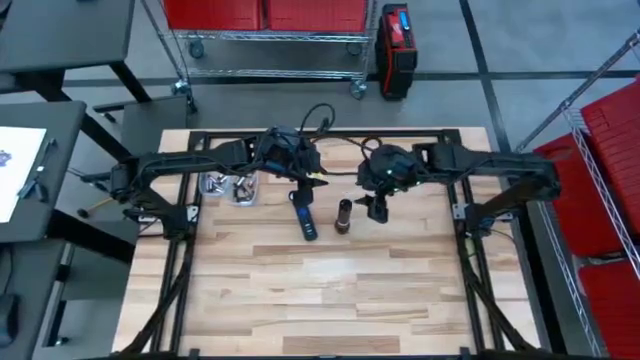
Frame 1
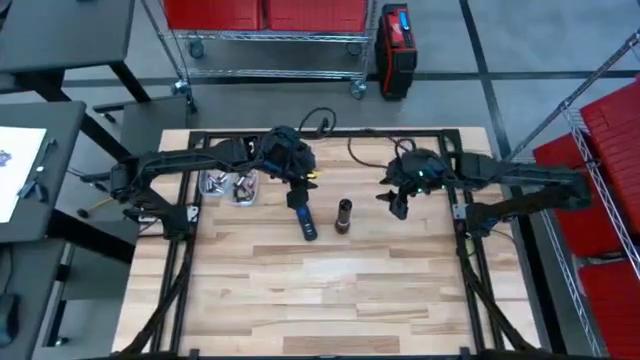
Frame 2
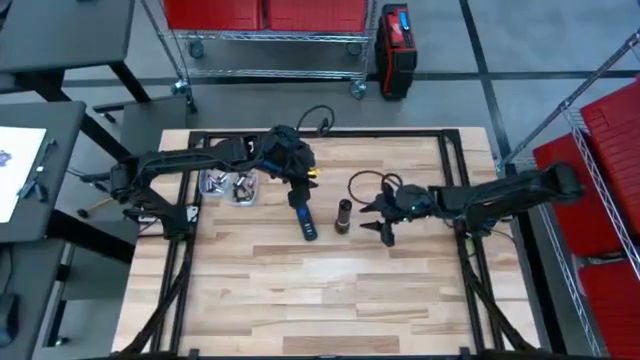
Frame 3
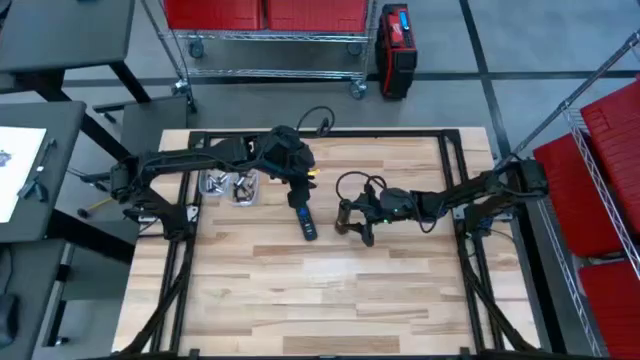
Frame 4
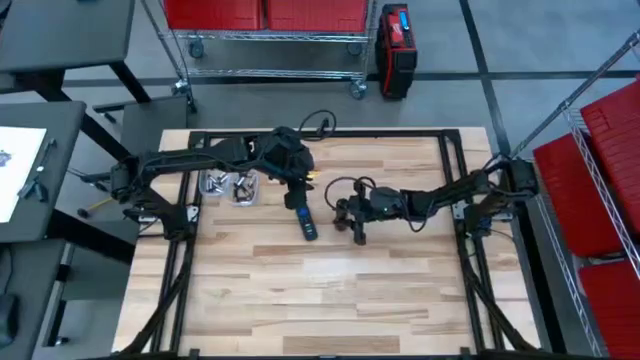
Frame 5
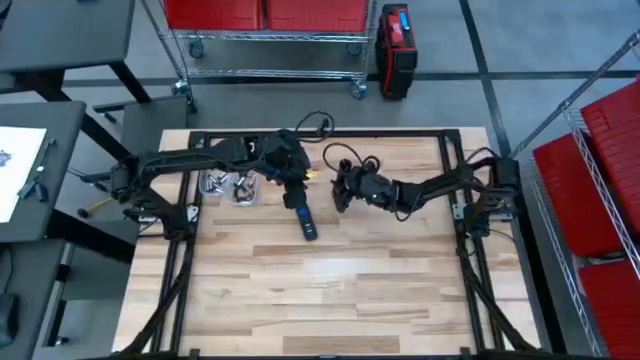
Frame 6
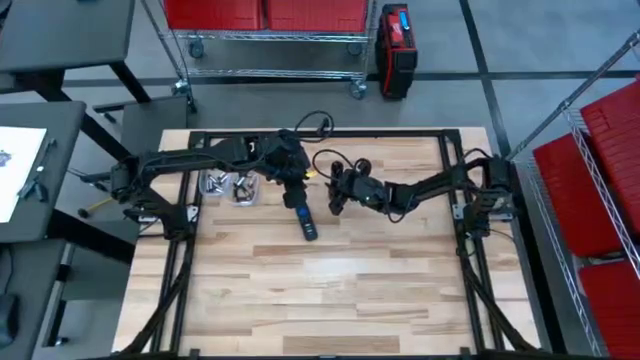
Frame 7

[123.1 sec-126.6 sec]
Task: Insert battery
Adjust the flashlight

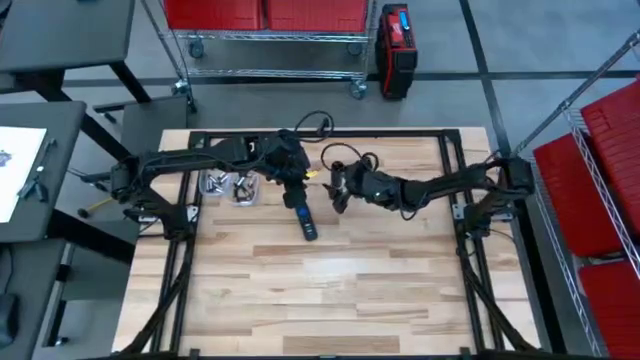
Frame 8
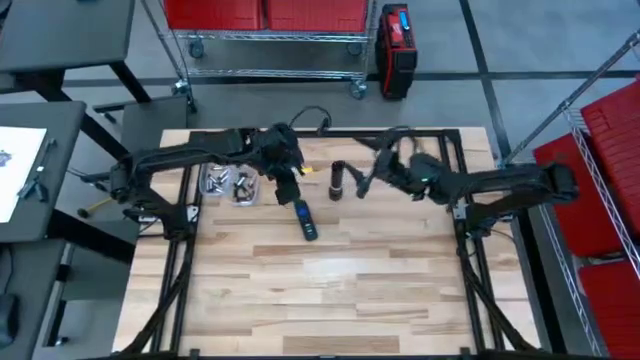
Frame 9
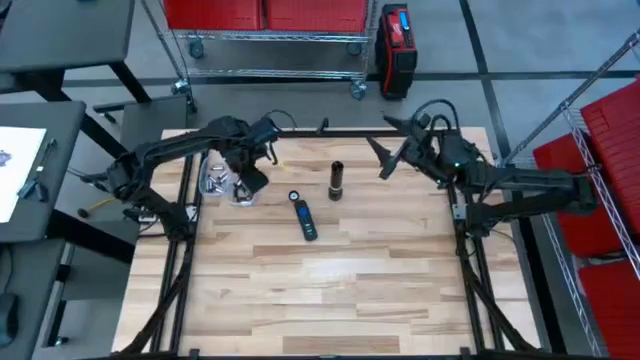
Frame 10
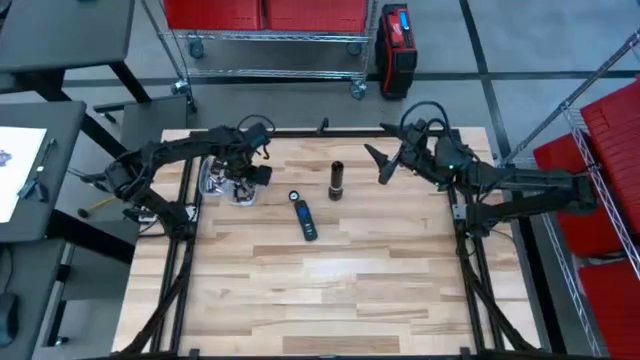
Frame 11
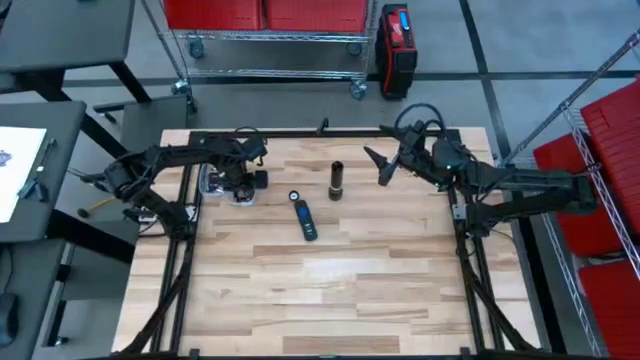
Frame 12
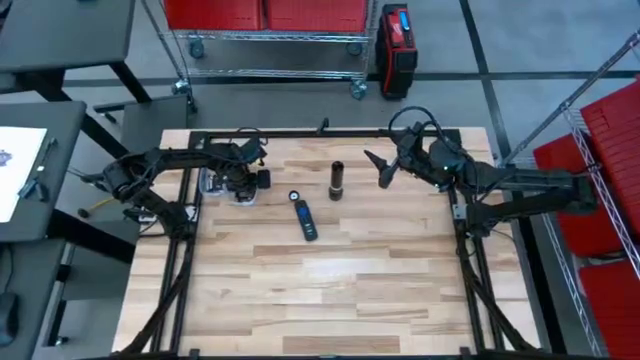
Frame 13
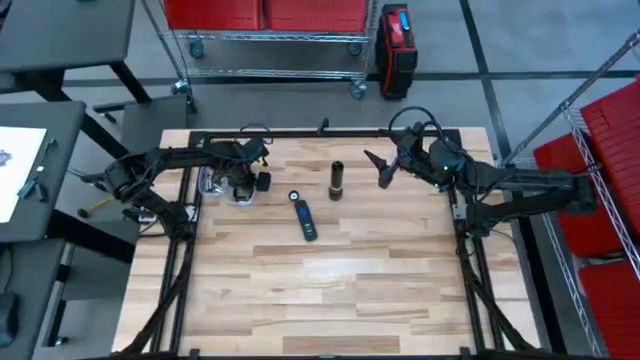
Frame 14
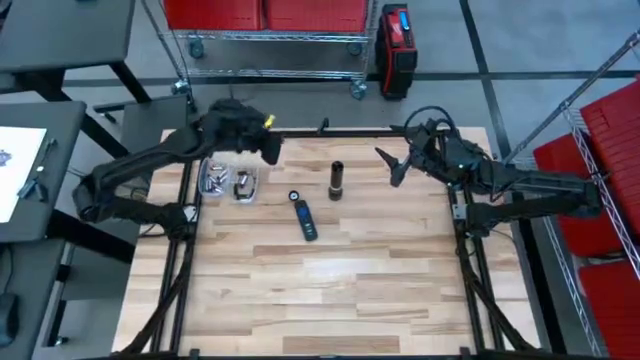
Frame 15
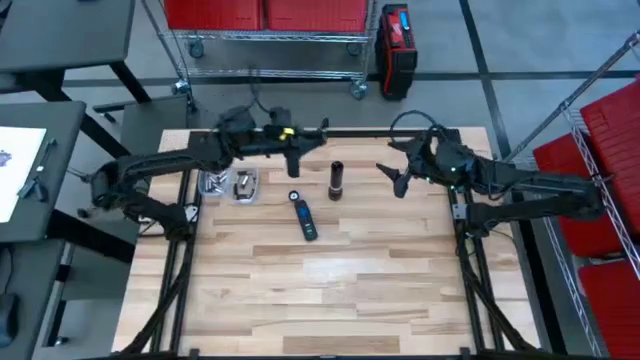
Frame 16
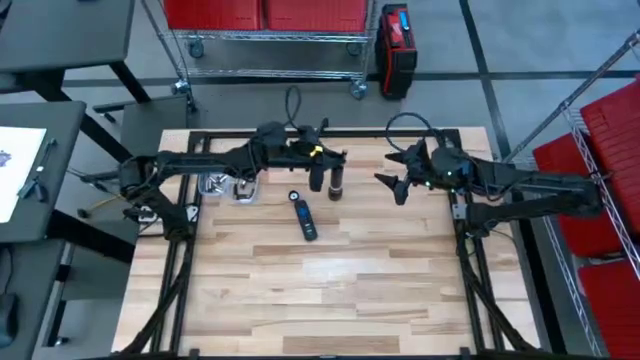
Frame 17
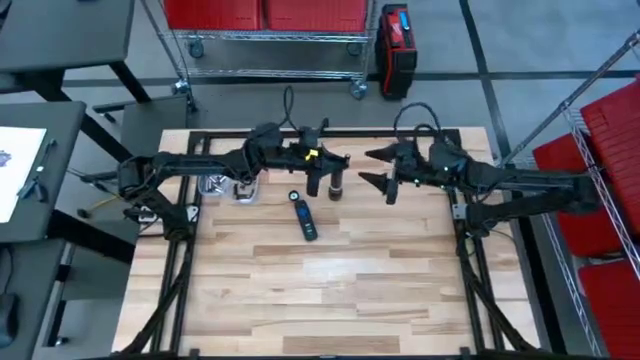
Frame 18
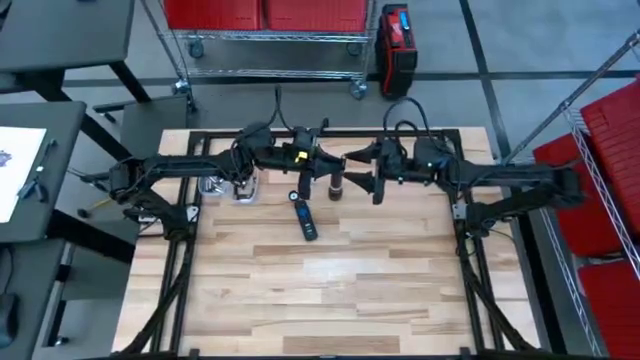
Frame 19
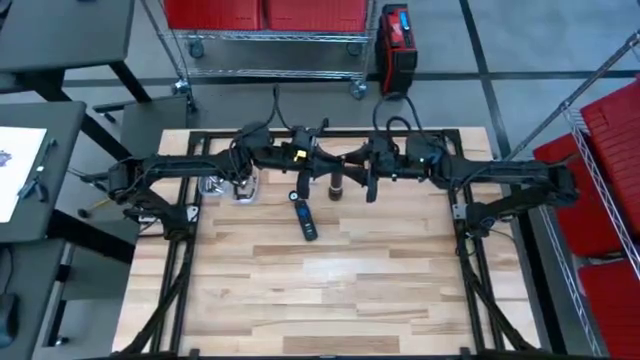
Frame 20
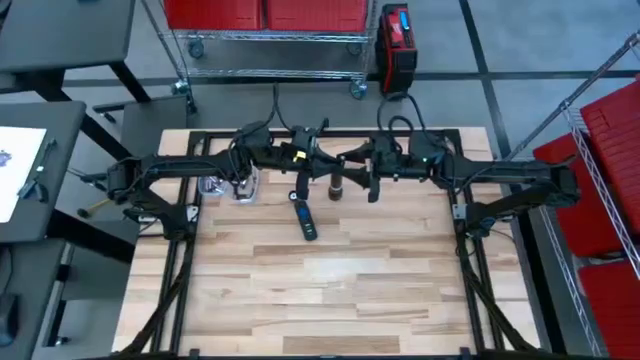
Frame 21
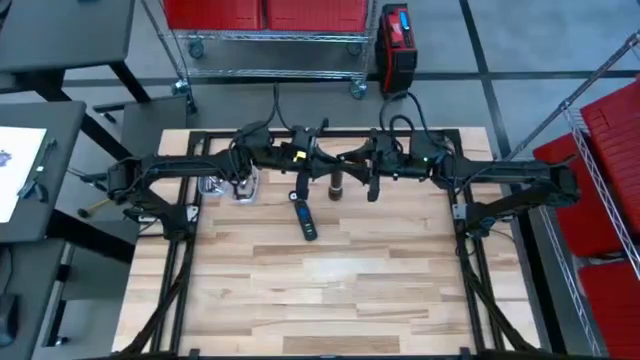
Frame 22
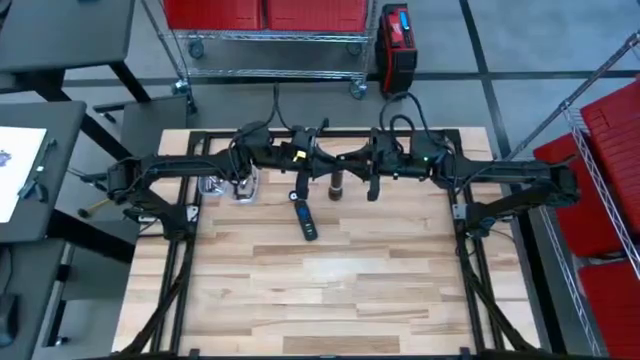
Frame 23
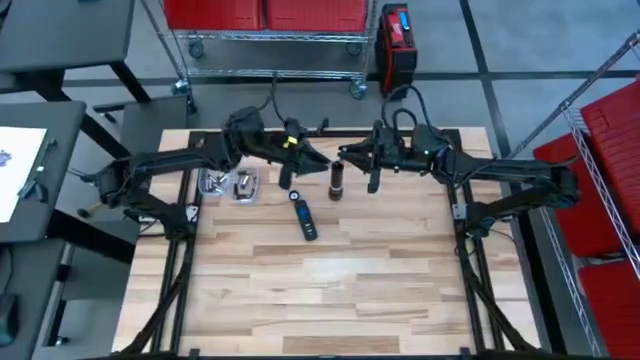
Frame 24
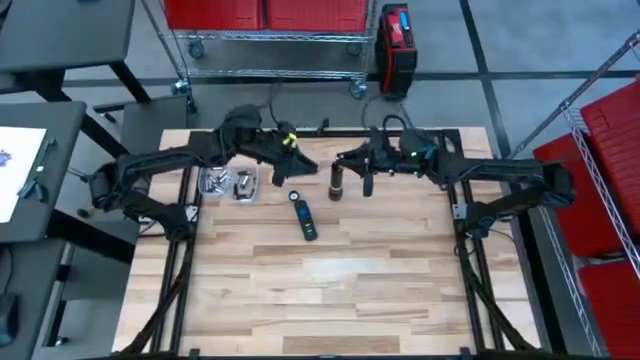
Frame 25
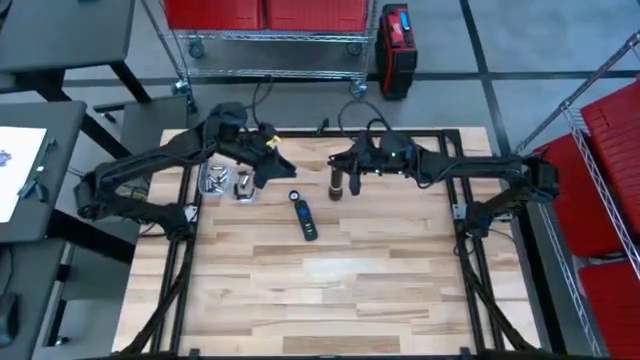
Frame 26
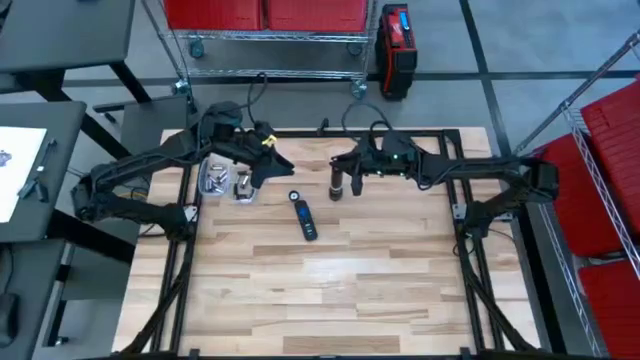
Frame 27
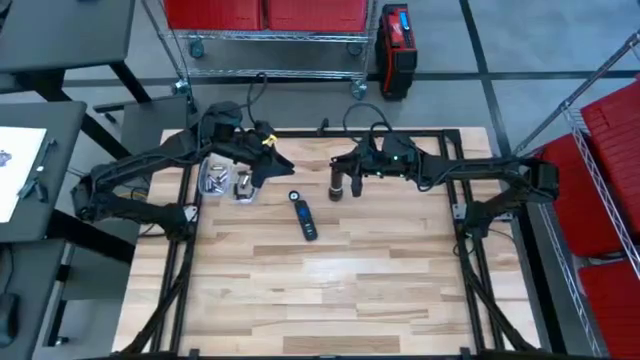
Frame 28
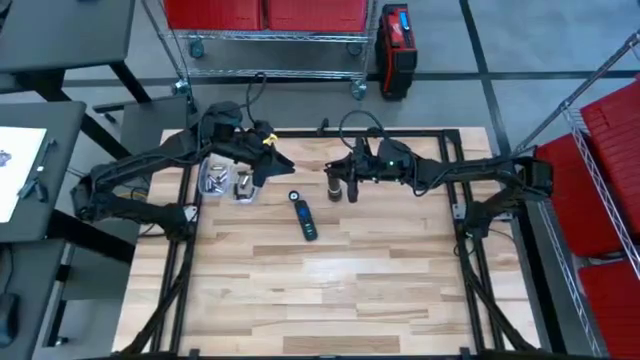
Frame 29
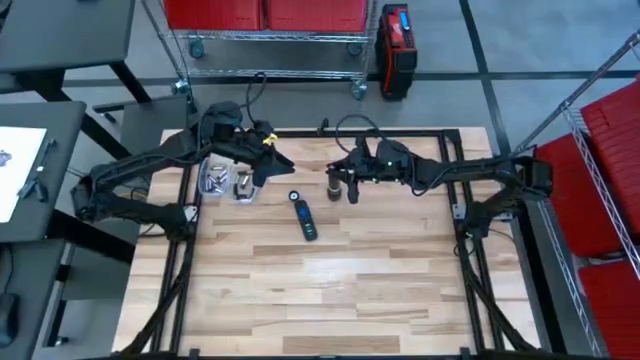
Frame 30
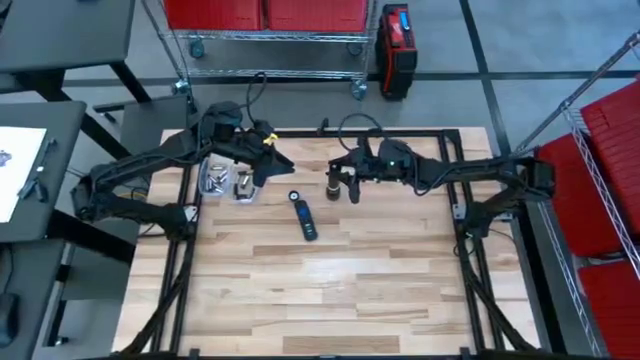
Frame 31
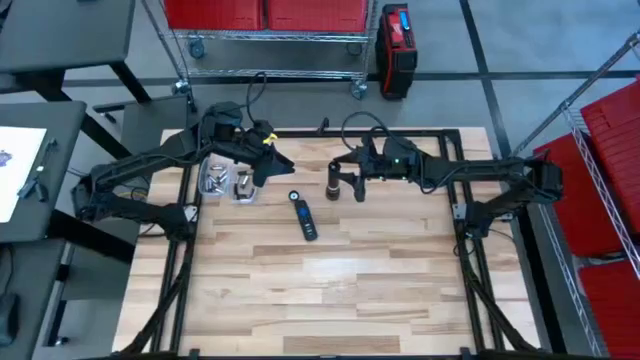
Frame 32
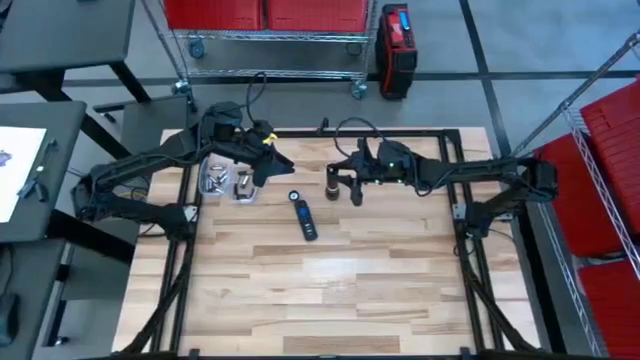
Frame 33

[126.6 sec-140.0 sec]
Insert the brown battery into the flashlight's battery compartment

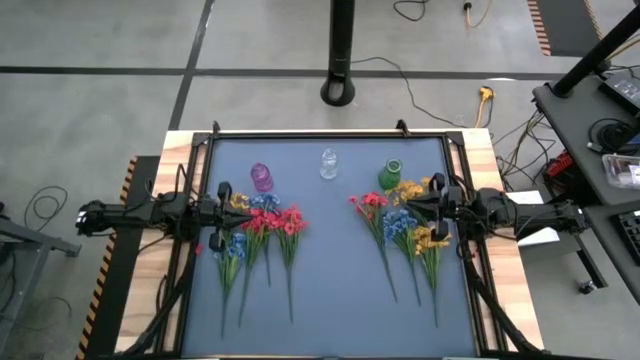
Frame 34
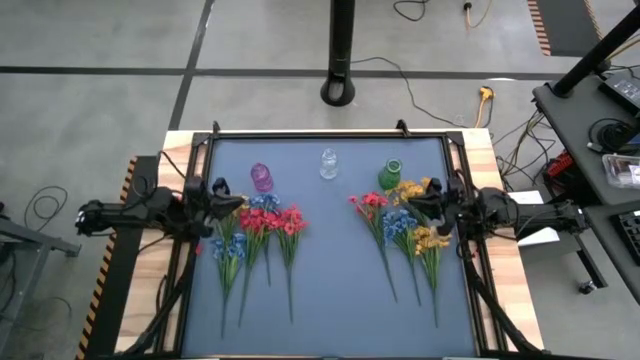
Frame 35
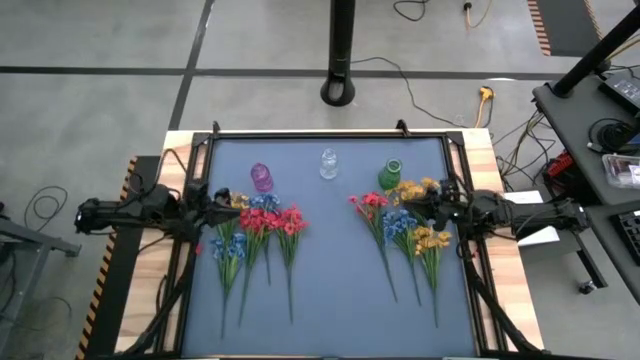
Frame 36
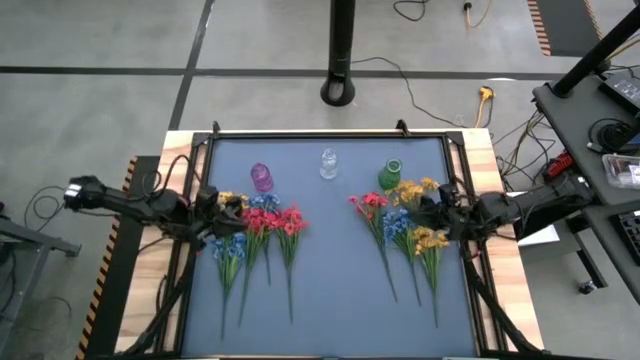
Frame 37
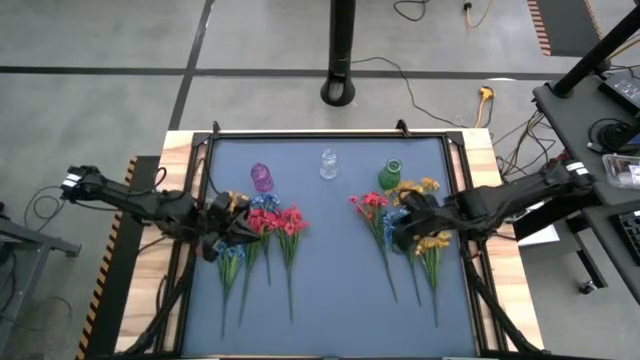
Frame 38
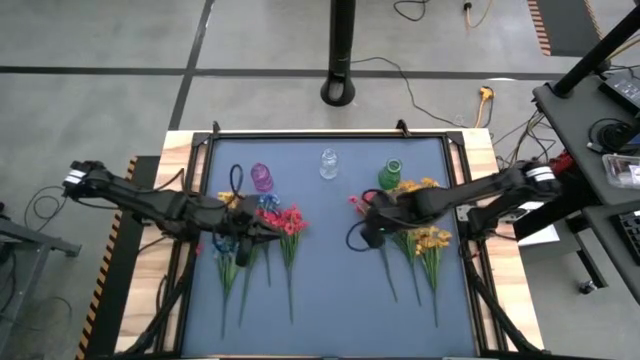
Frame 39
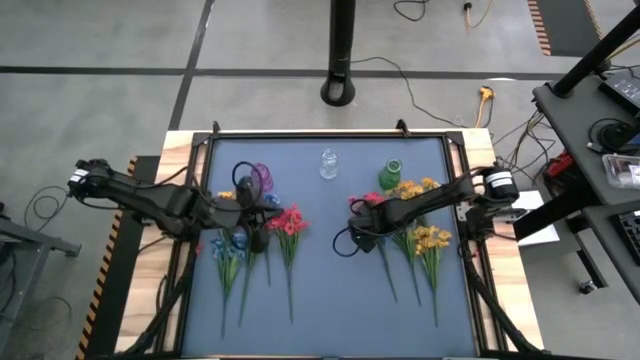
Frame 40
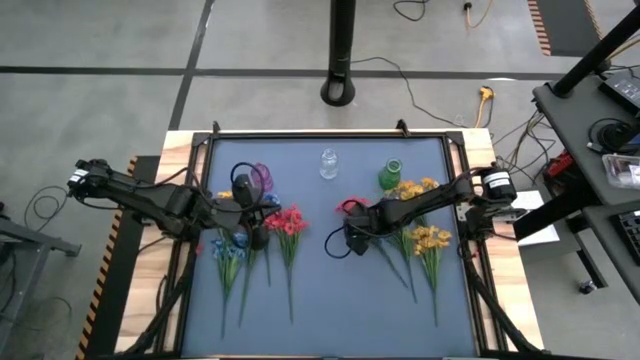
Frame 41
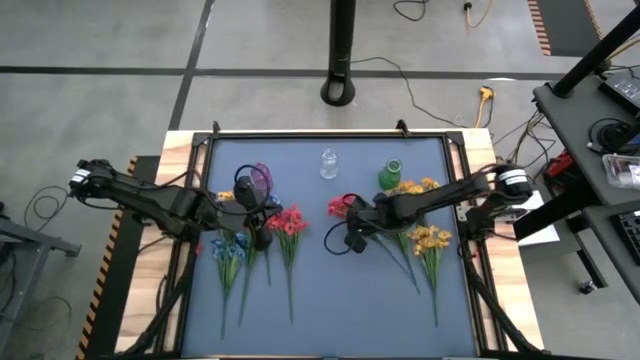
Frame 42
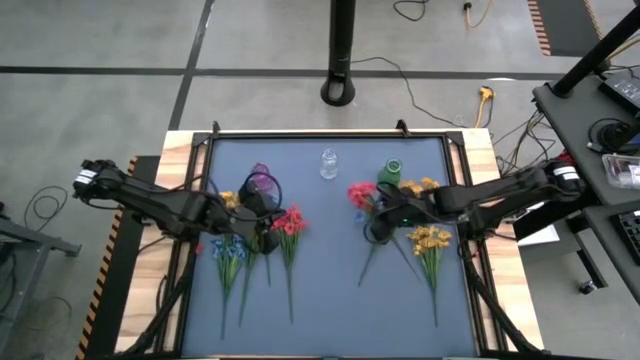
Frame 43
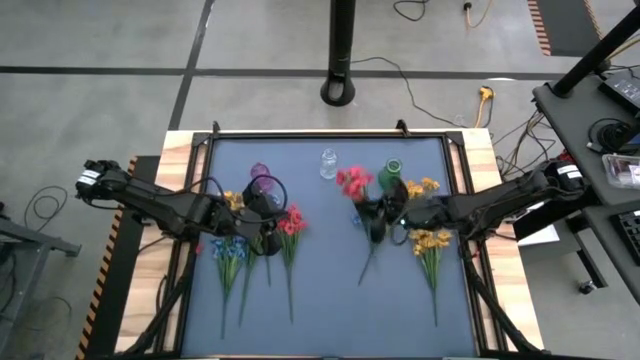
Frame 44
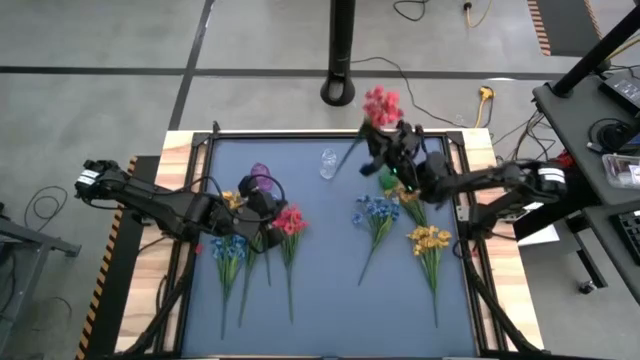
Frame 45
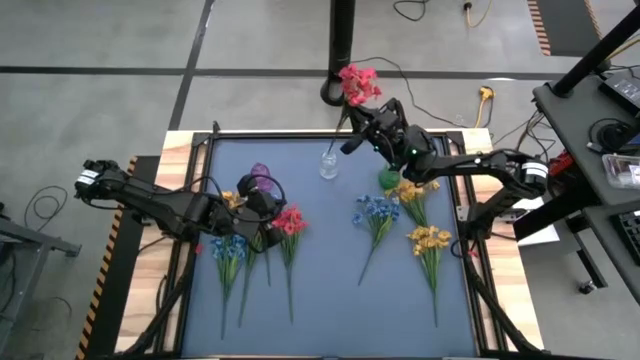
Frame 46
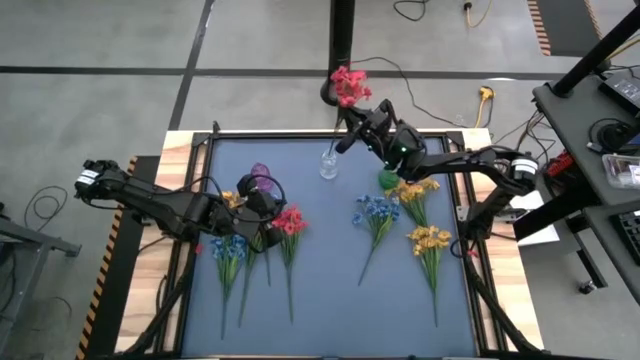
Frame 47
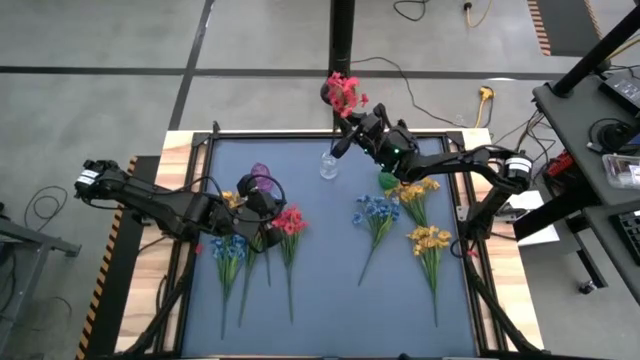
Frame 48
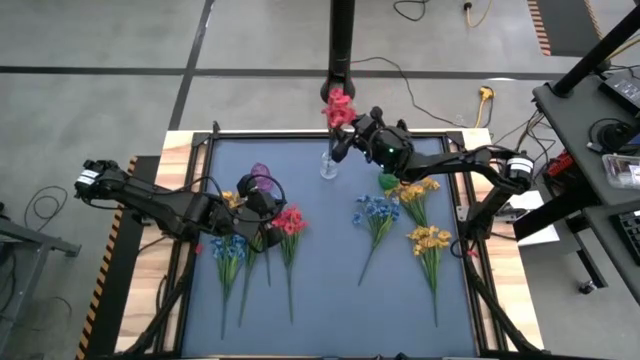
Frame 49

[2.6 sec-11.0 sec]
Task: Sort flowers into vase by color
Put the right red flower into the transparent vase
